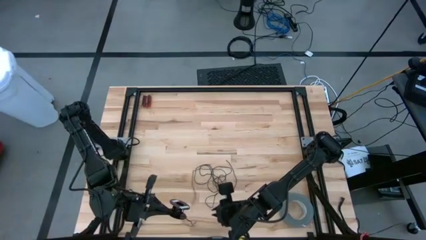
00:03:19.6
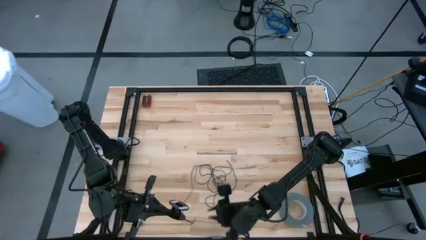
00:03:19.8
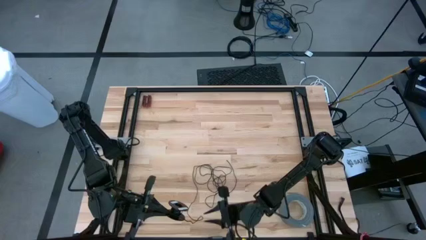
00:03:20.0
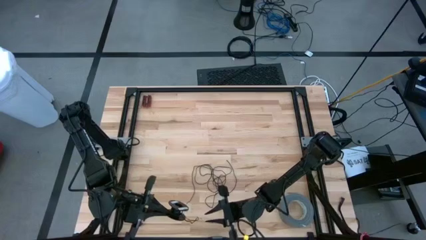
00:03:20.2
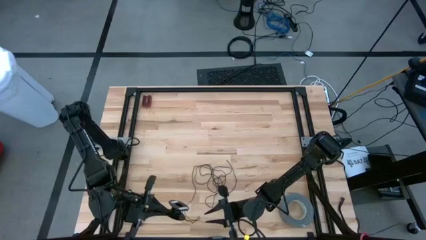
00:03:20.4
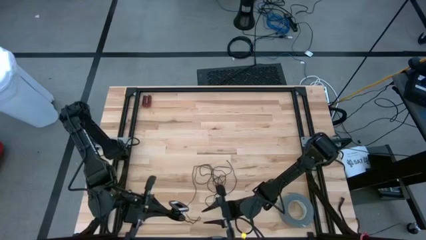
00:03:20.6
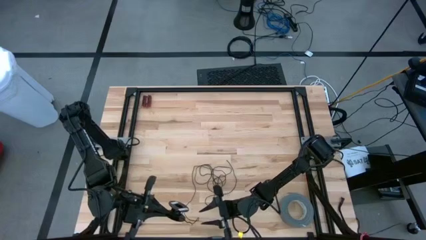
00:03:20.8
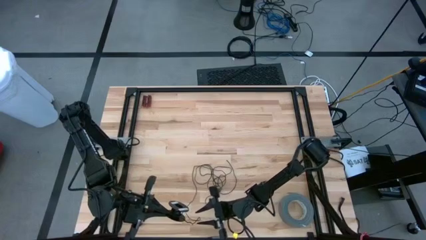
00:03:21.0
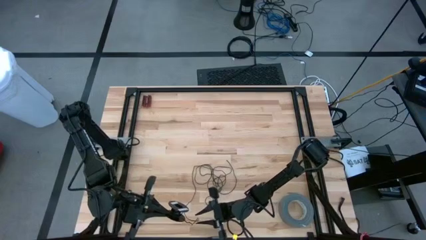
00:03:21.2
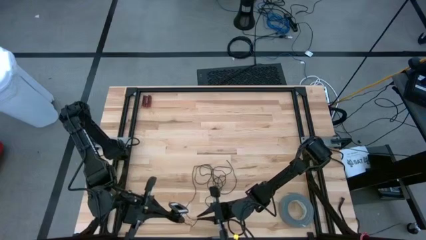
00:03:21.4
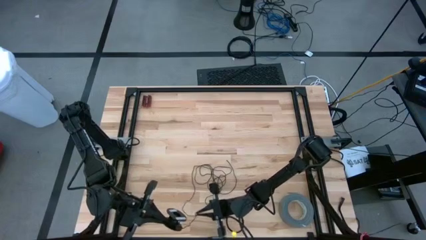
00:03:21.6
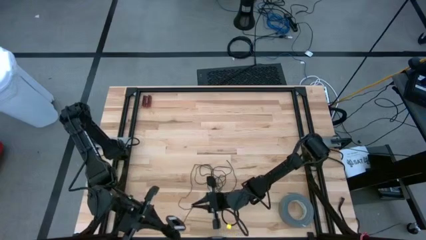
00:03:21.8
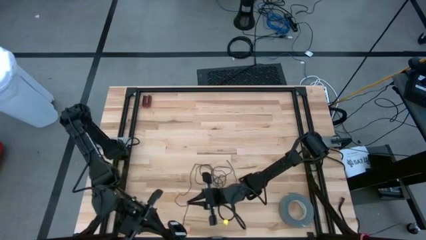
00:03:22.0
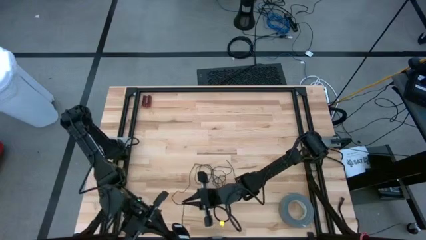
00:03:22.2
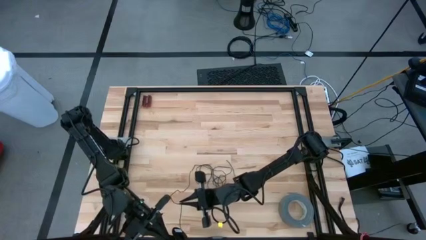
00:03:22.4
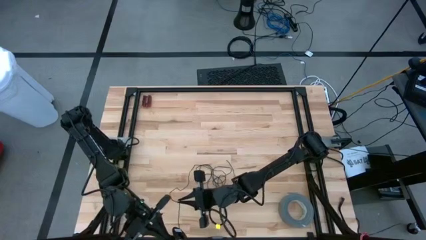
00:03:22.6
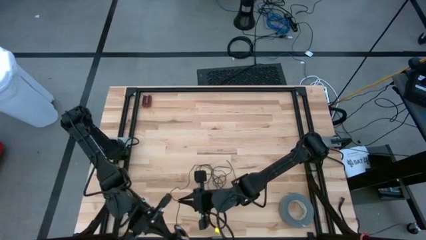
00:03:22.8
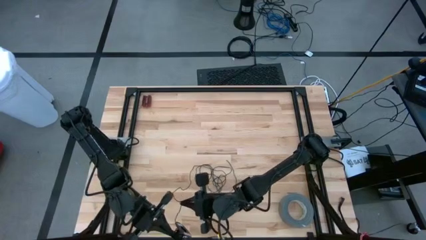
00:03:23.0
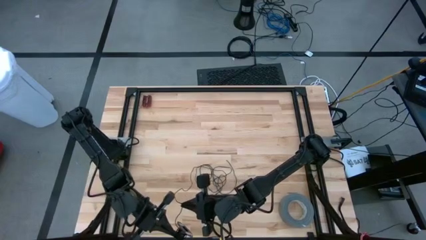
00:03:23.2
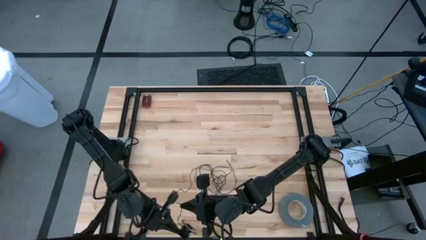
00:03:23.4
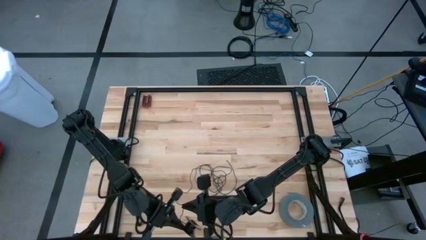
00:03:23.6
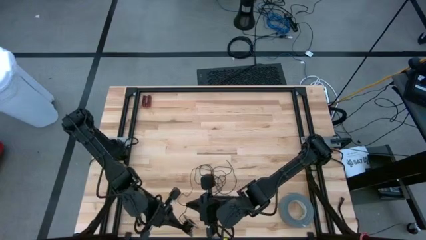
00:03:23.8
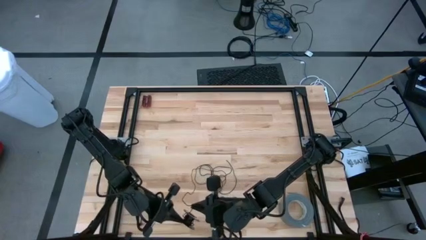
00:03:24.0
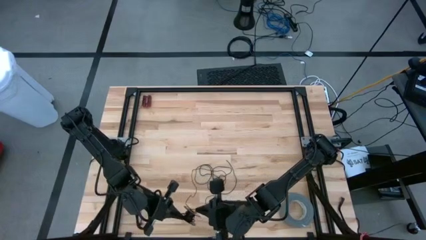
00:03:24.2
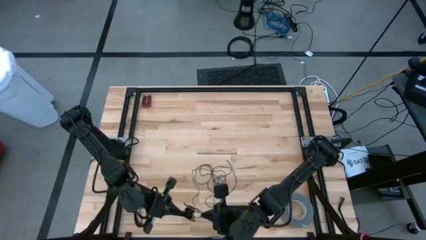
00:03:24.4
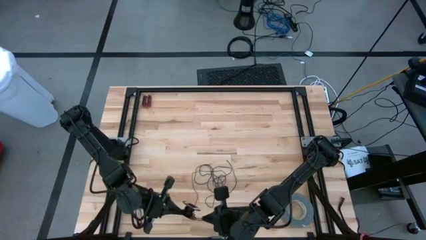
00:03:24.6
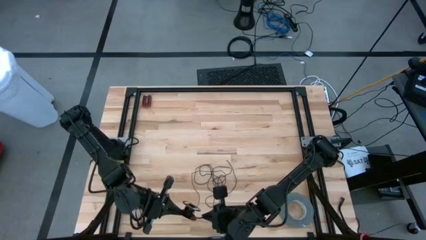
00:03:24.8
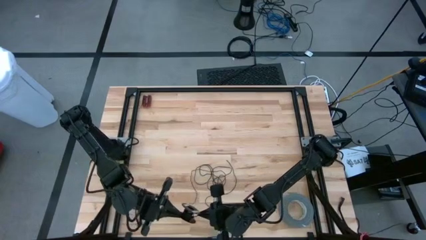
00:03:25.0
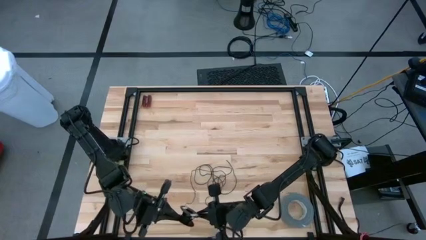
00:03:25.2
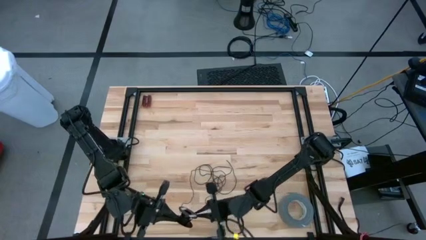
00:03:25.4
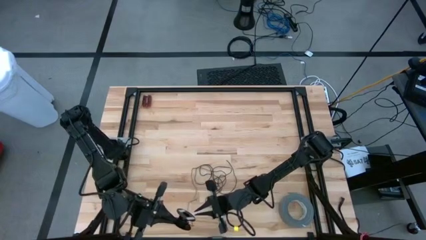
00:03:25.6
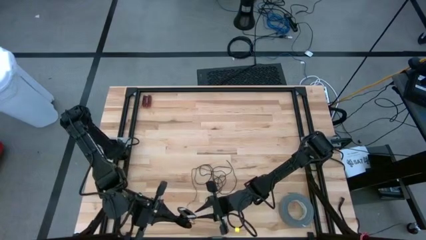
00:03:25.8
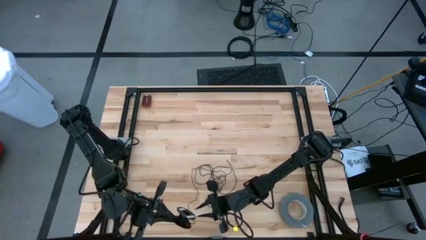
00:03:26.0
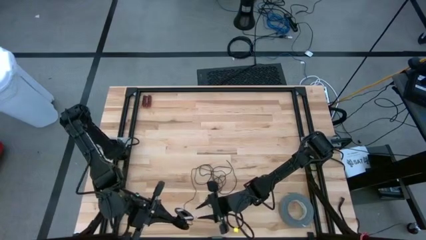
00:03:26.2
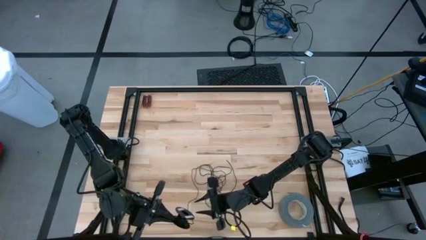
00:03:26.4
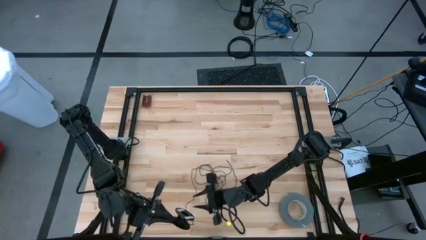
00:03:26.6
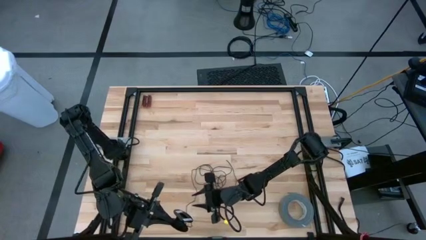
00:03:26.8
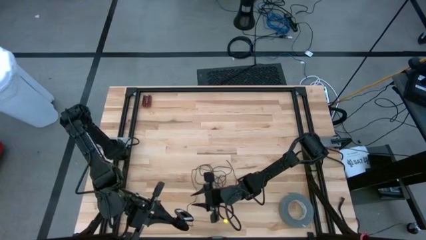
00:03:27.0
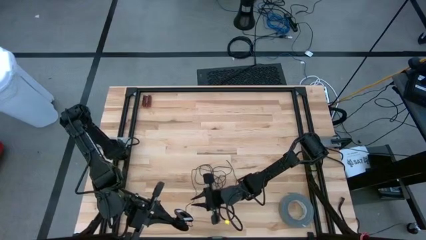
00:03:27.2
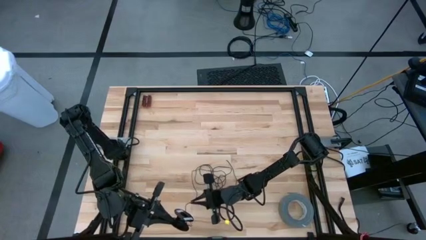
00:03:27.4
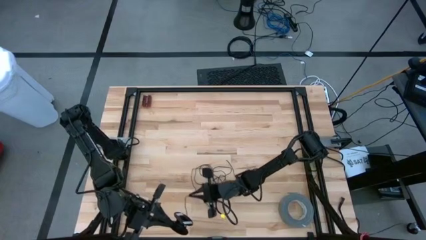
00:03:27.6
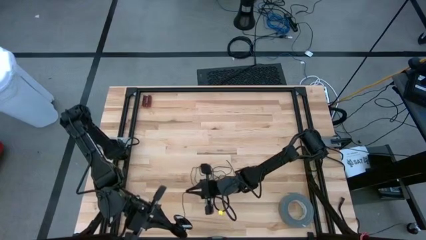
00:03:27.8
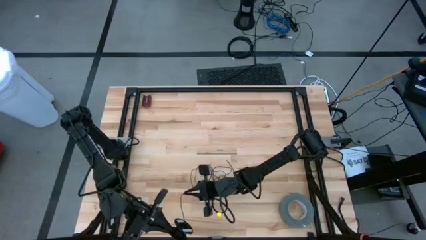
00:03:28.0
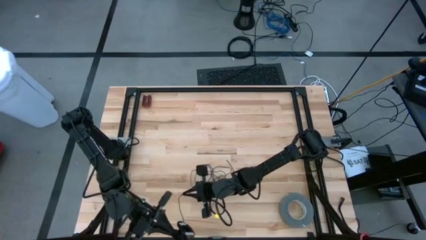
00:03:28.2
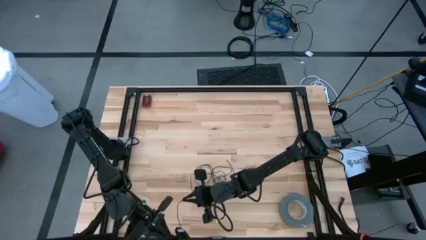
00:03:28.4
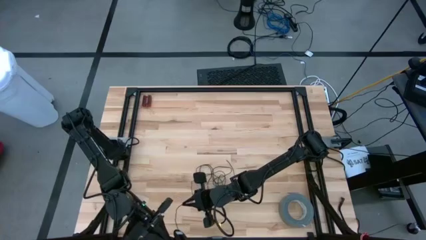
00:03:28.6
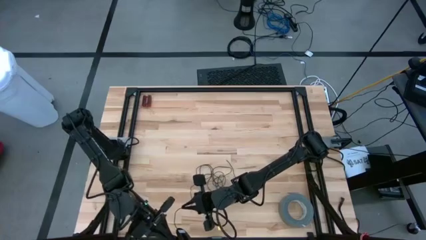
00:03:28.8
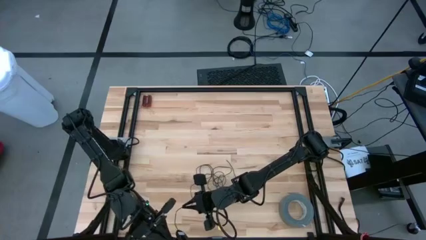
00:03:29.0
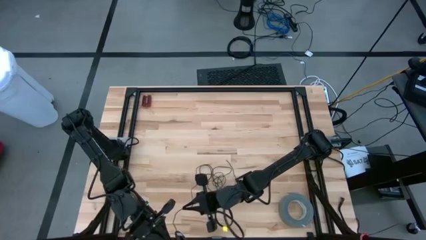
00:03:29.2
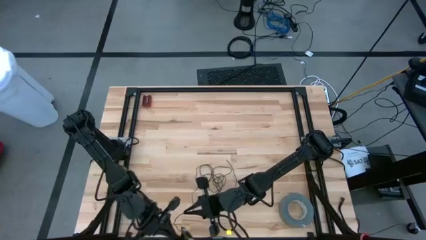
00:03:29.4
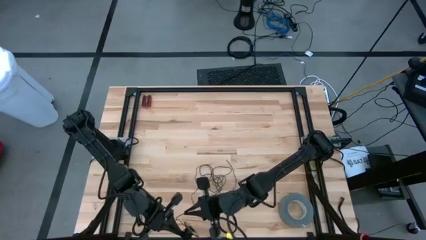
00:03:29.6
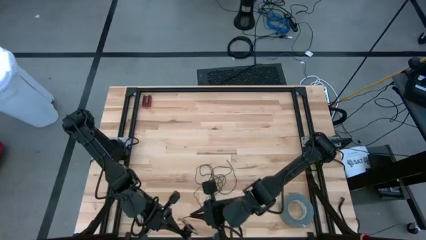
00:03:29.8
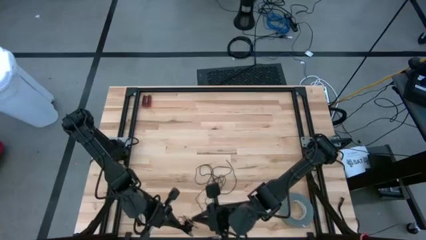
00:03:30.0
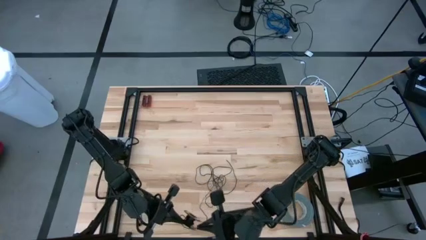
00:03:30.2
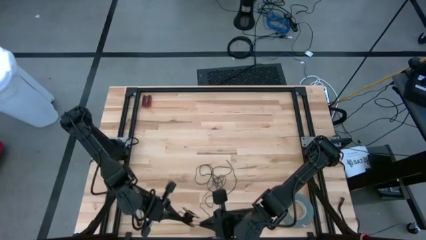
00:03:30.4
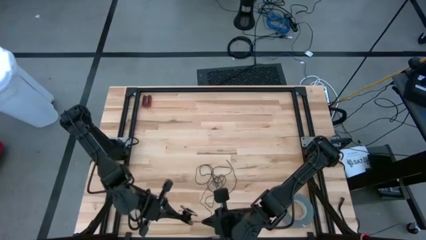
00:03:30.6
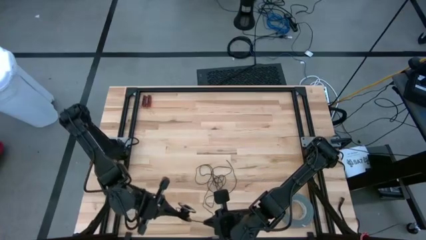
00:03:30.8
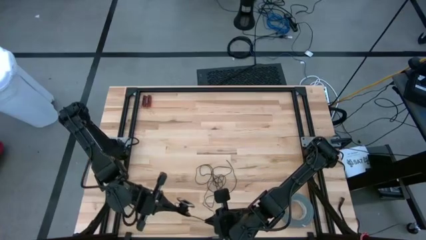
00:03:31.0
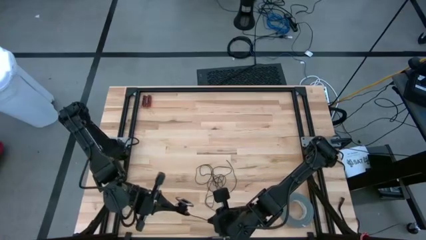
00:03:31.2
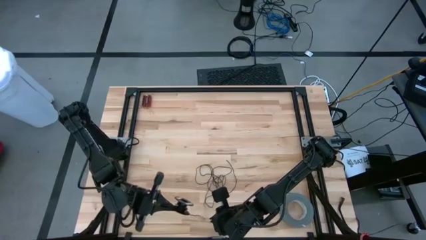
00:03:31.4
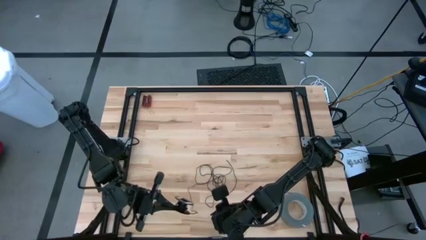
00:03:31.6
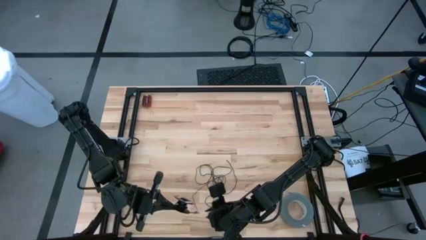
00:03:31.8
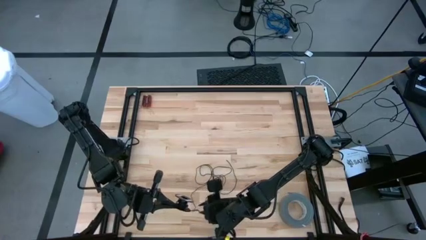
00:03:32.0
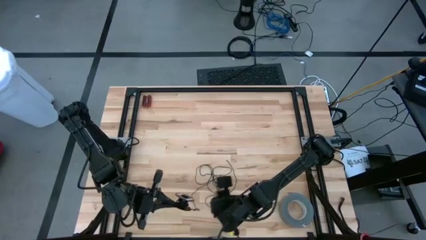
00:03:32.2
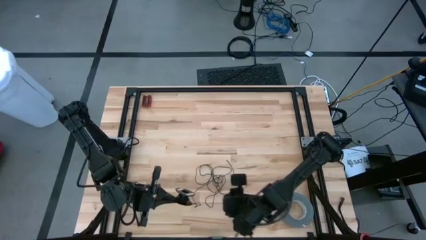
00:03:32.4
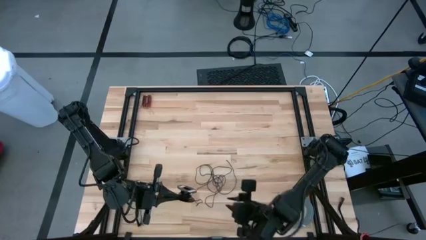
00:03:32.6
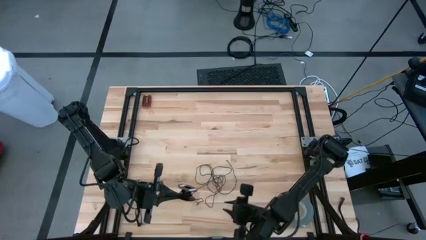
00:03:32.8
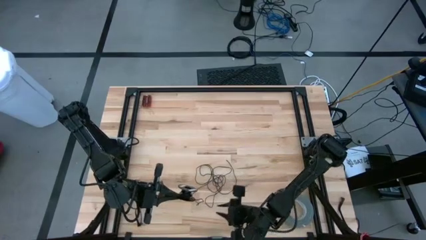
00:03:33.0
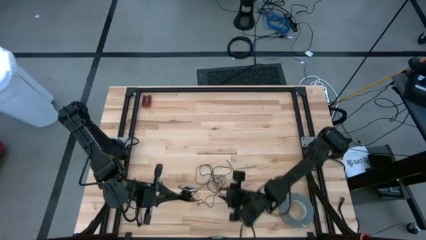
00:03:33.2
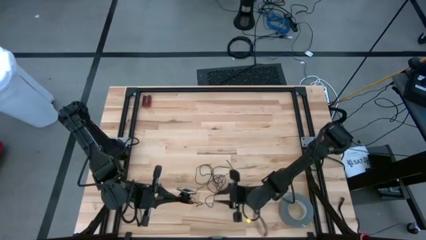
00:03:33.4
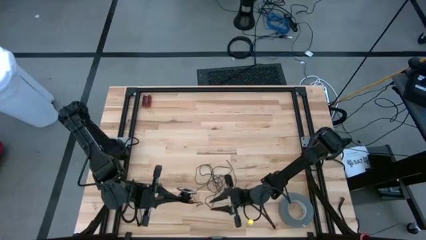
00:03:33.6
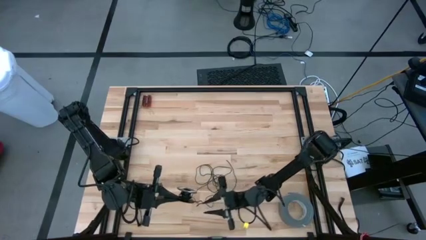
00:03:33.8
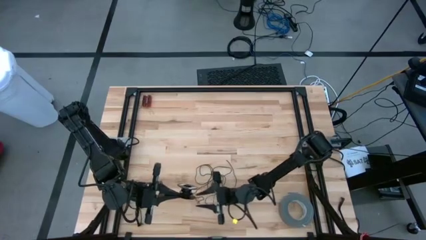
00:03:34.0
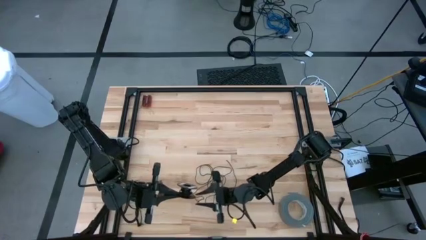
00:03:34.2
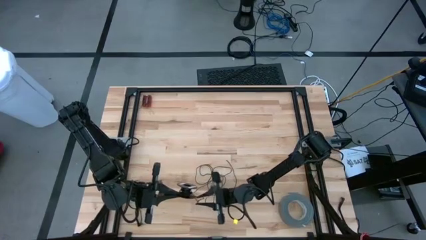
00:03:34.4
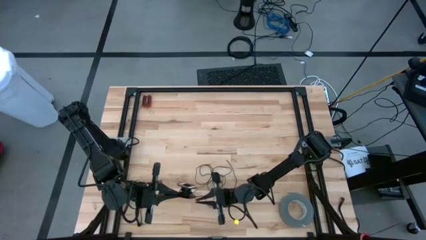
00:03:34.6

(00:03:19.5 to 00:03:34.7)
Task: Coil cords
Coil the black wire on the spool
